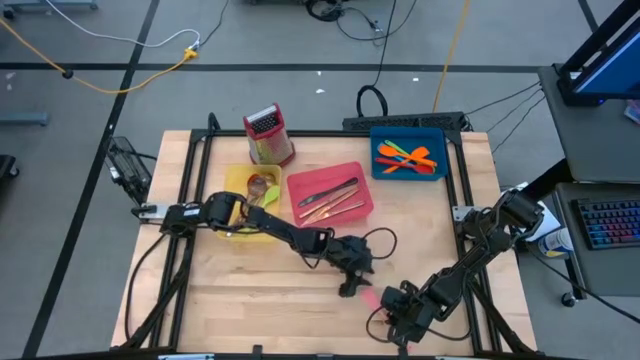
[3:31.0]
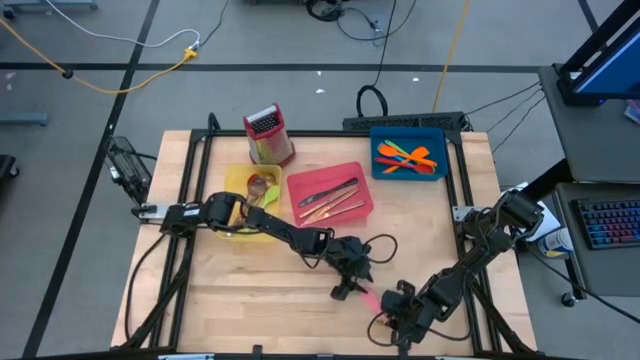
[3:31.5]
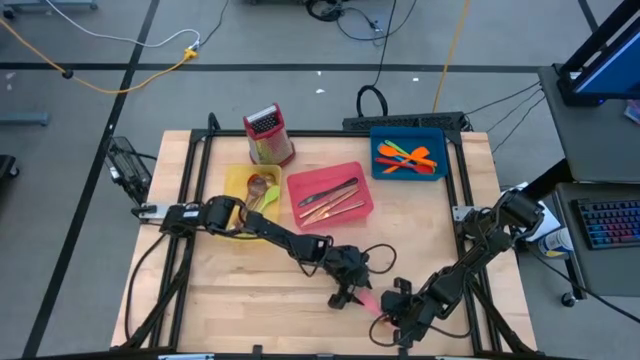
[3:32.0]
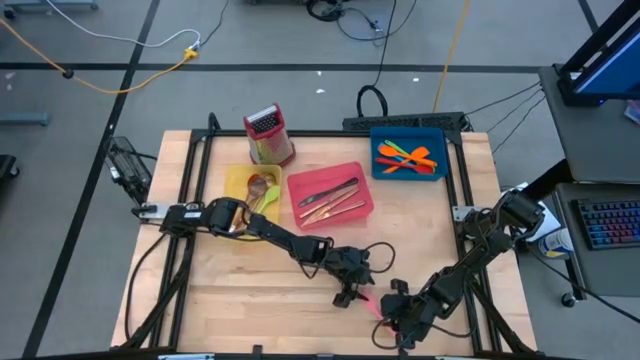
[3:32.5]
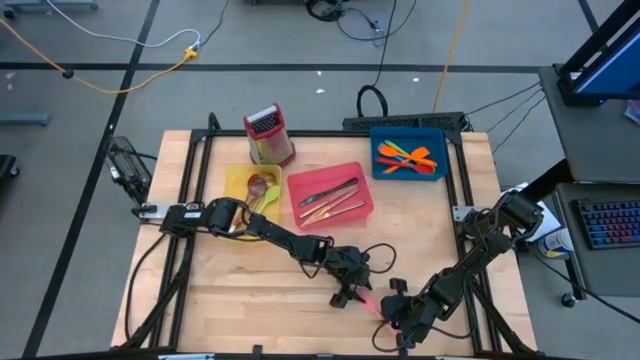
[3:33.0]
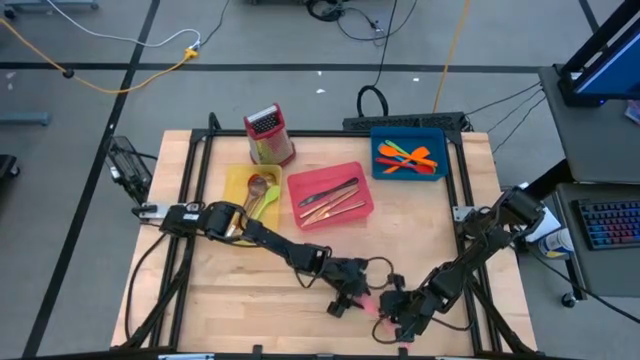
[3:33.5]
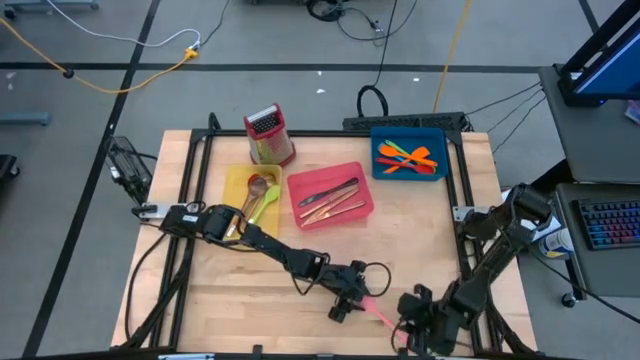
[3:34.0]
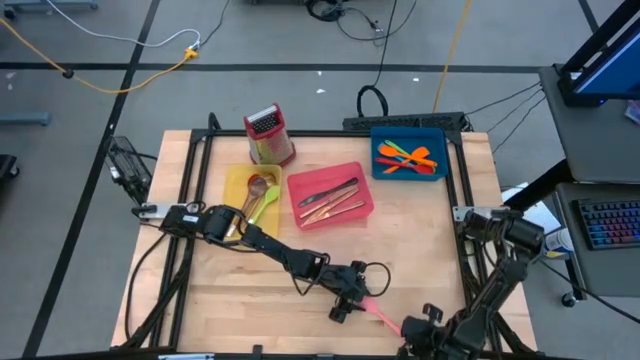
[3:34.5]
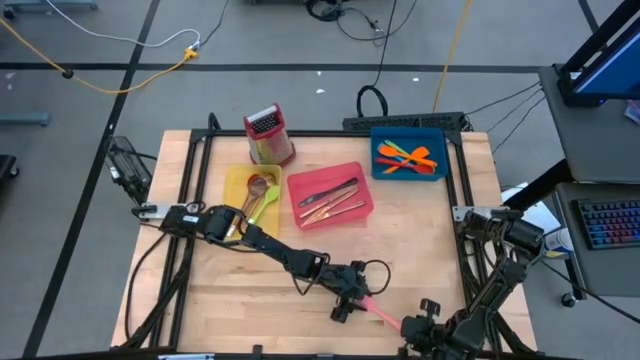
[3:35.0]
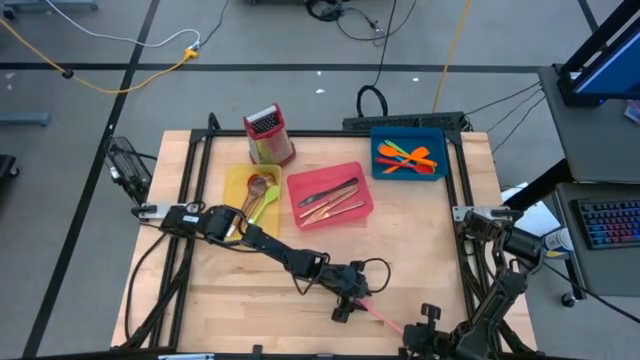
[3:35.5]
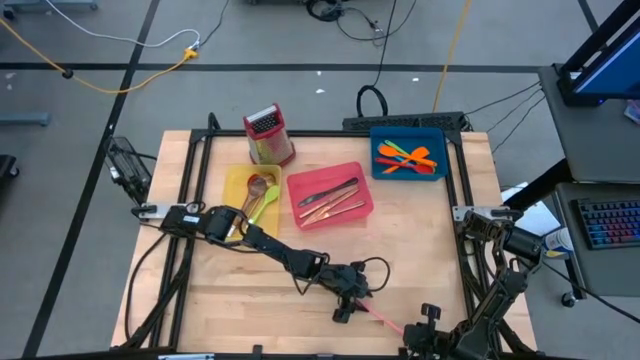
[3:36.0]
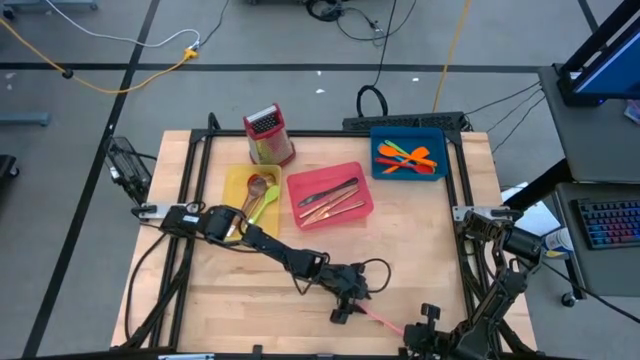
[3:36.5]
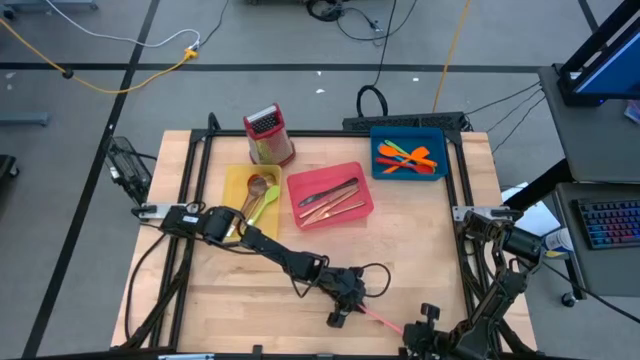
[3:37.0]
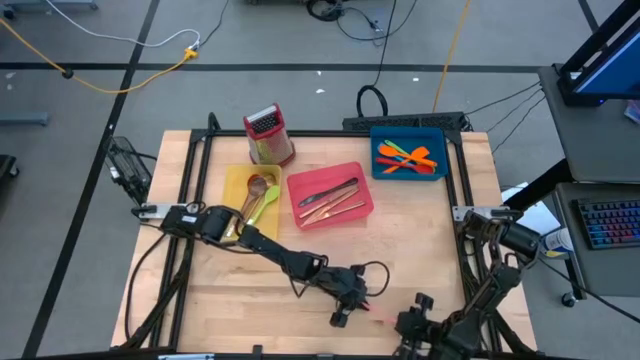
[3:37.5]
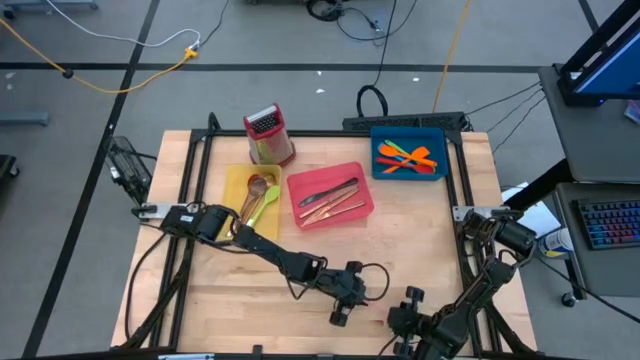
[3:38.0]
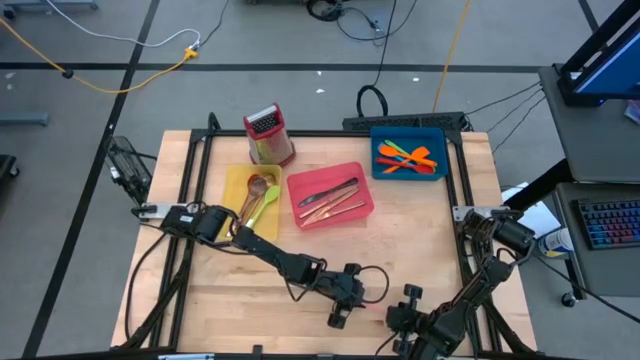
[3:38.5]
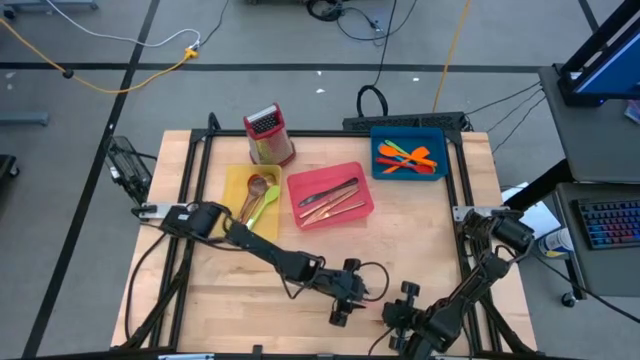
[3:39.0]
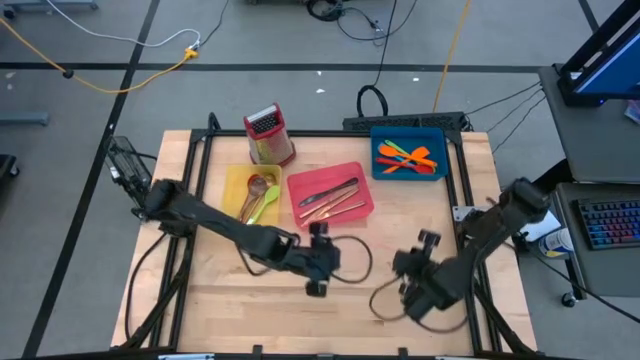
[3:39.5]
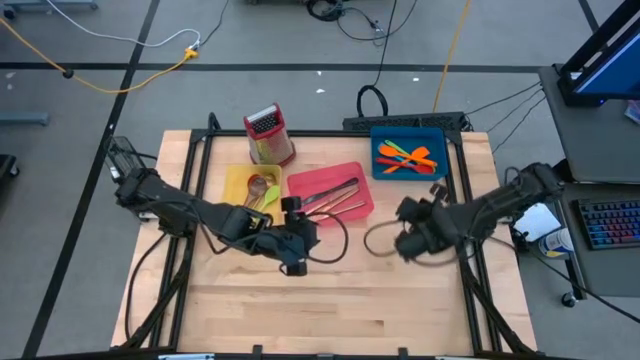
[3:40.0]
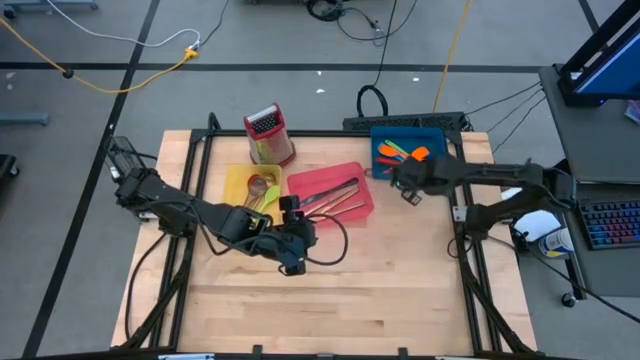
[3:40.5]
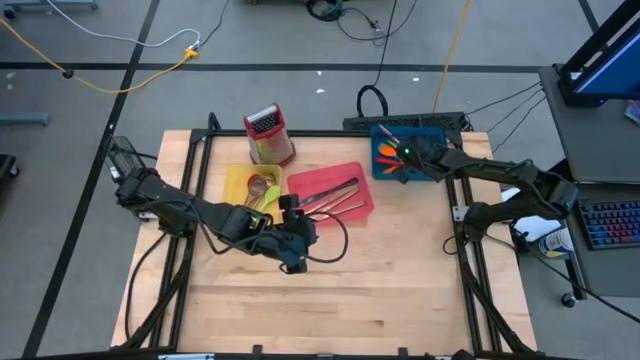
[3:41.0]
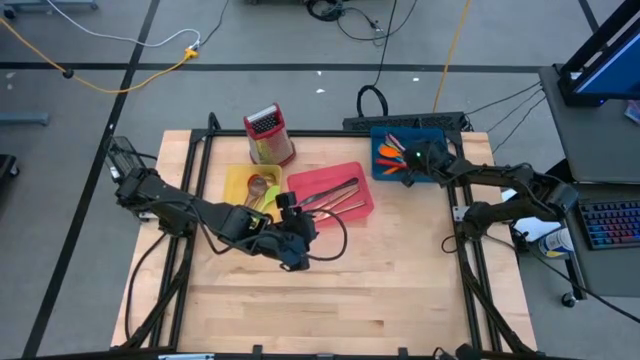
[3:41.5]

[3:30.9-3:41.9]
Task: Pick & Place Kitchen Items
Put the pink spatula into the blue bin

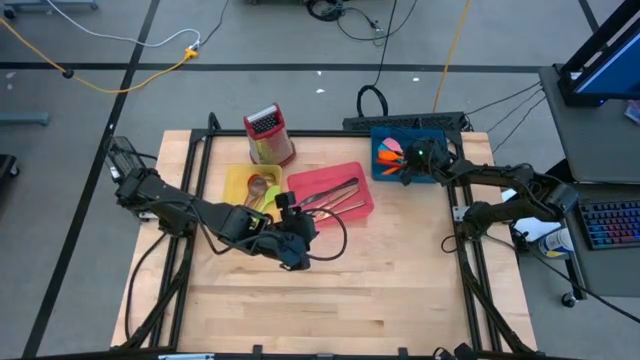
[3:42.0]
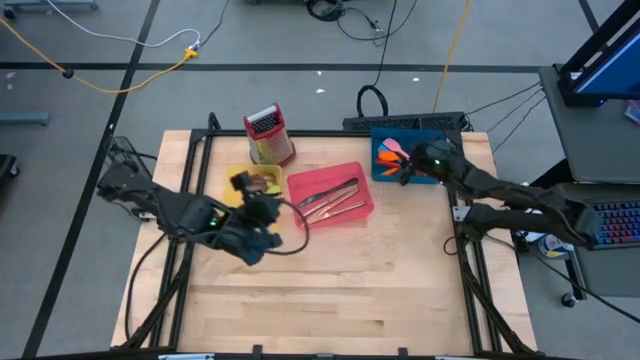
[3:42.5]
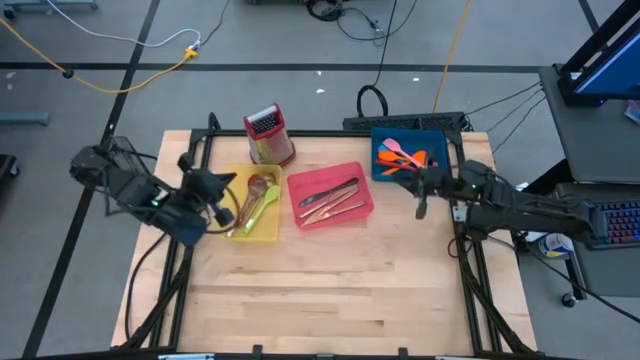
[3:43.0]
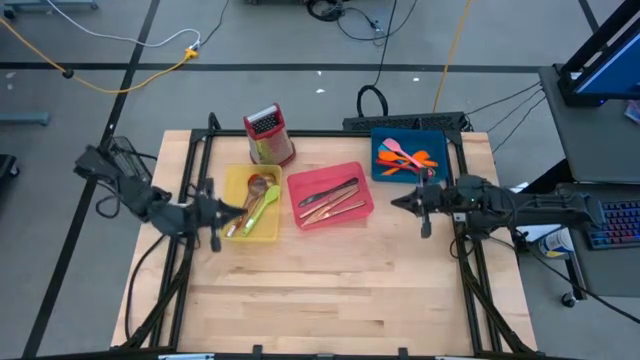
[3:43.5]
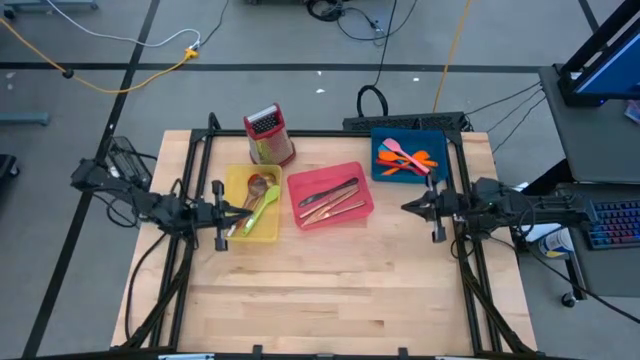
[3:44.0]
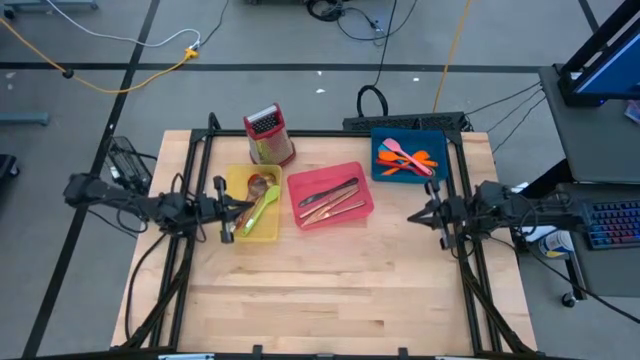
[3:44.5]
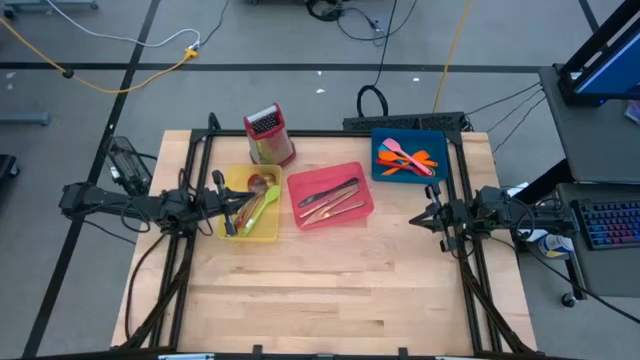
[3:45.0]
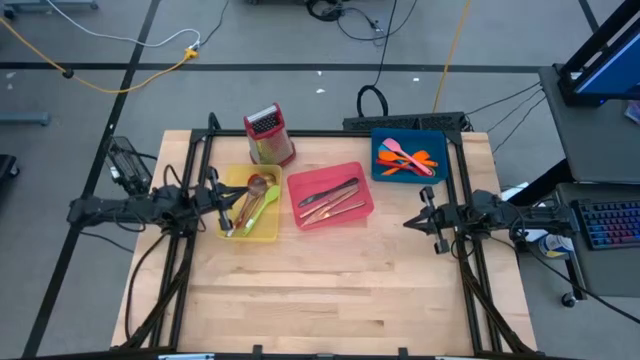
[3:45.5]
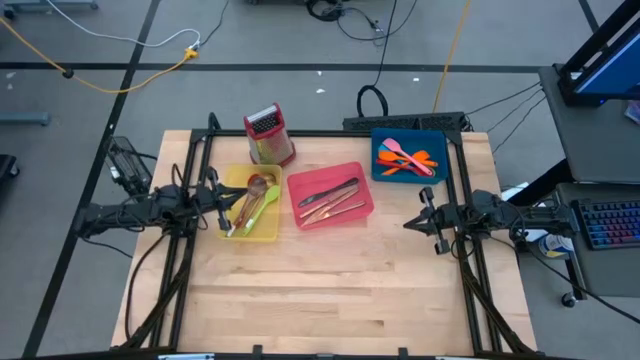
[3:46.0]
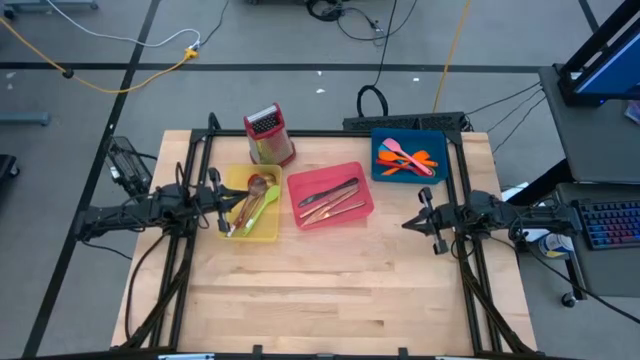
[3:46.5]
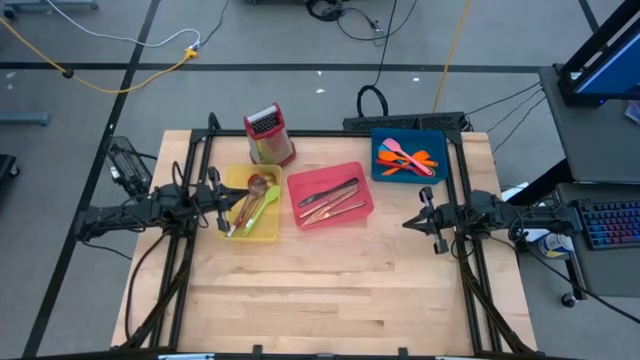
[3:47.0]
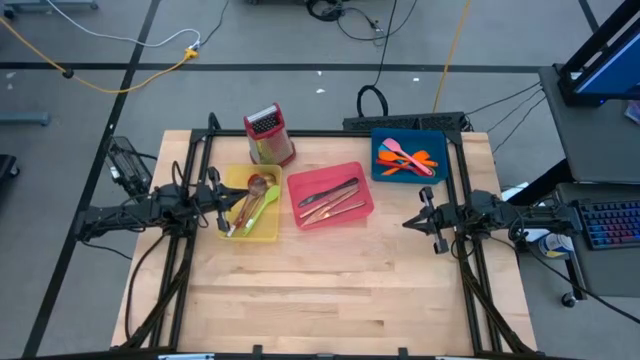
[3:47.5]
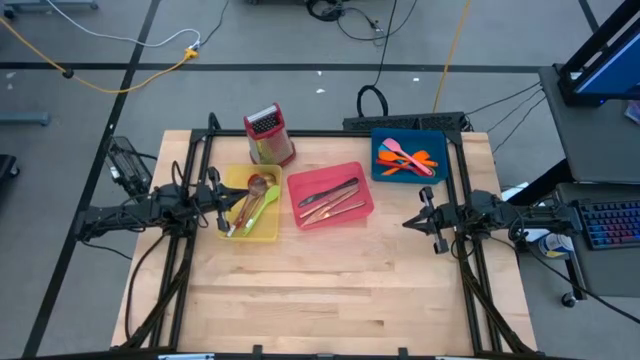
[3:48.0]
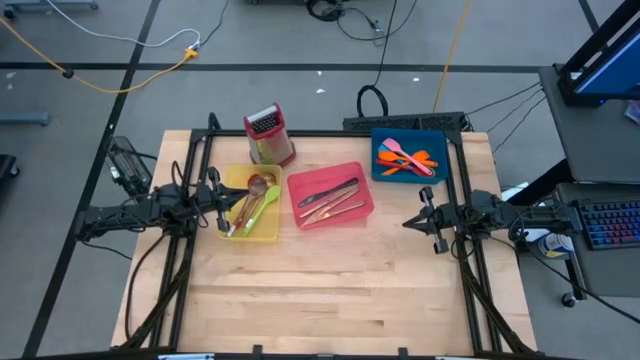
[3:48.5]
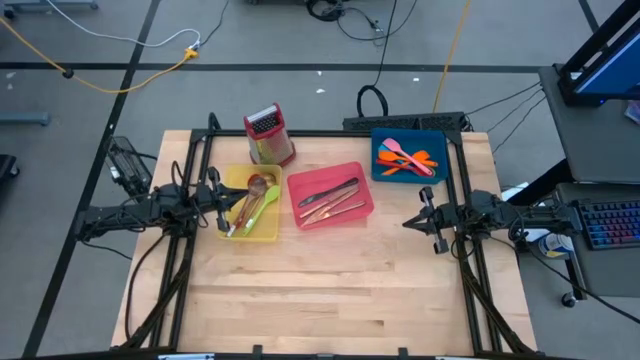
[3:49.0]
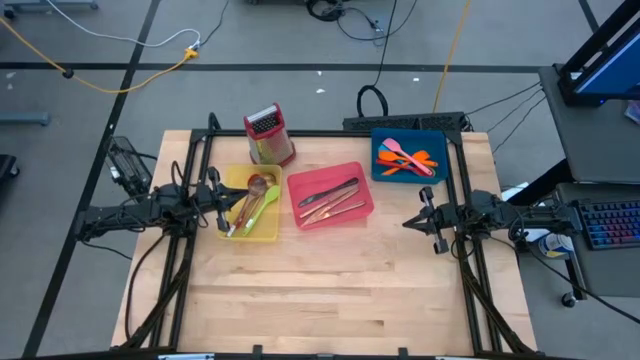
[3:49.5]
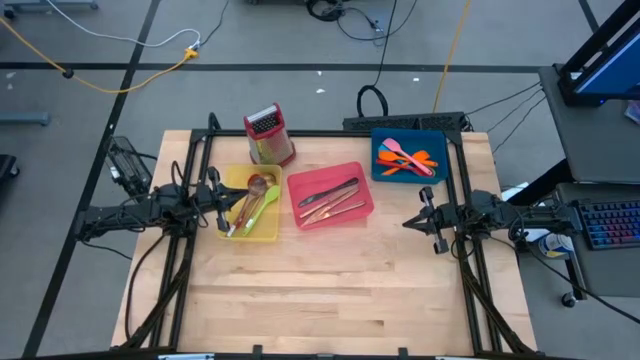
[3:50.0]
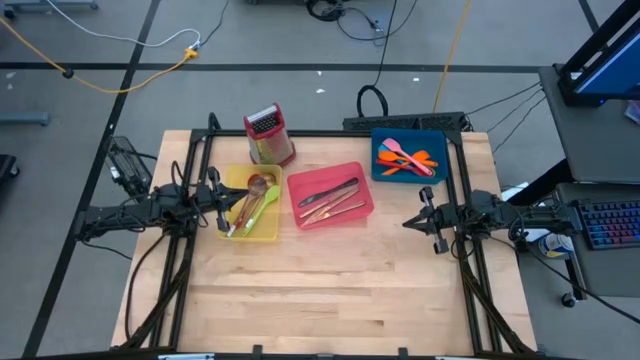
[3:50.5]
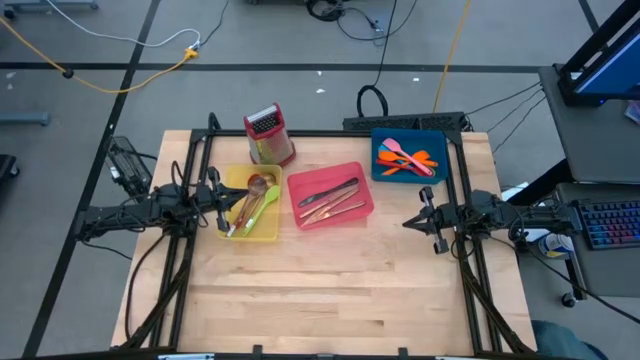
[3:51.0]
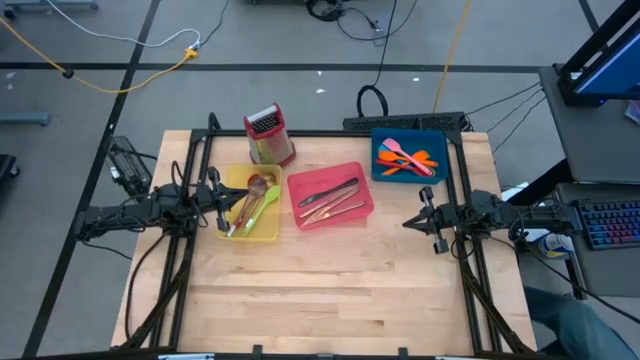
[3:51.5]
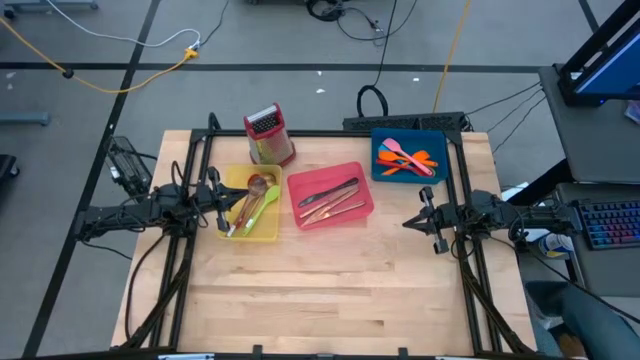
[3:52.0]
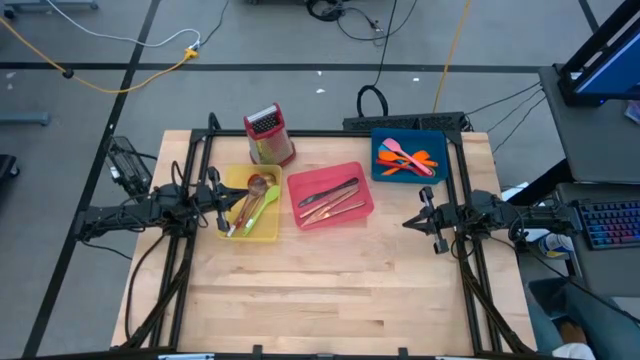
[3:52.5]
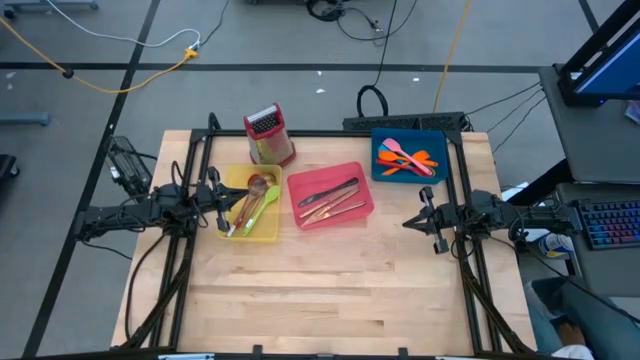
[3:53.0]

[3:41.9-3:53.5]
Return to Home Position
